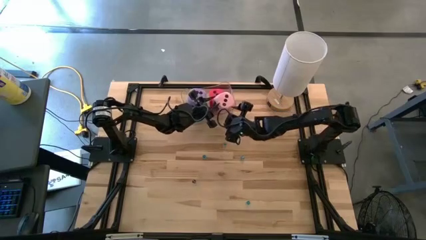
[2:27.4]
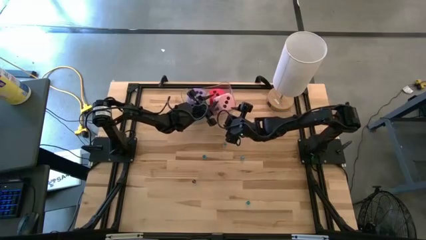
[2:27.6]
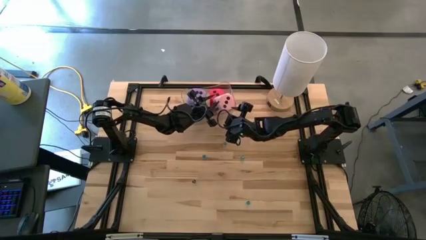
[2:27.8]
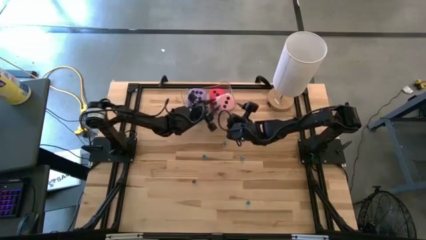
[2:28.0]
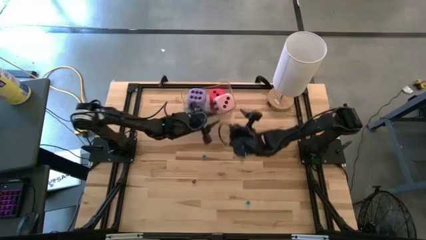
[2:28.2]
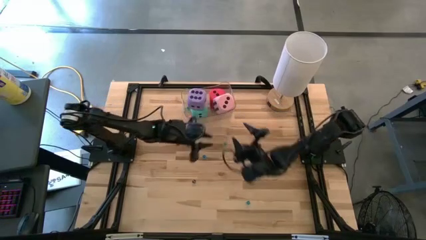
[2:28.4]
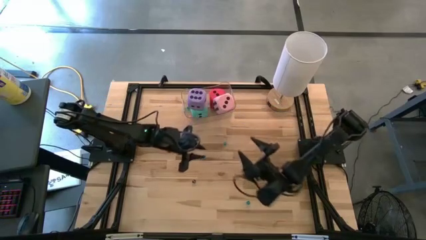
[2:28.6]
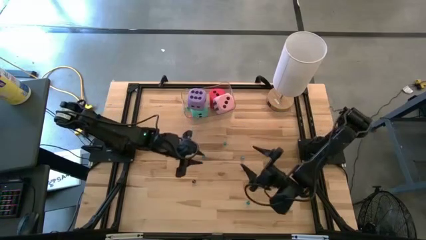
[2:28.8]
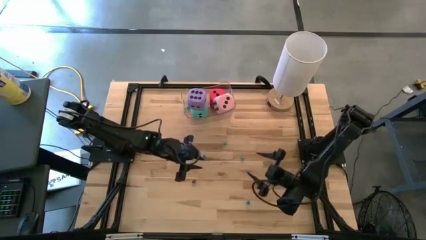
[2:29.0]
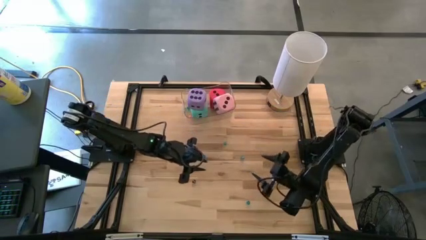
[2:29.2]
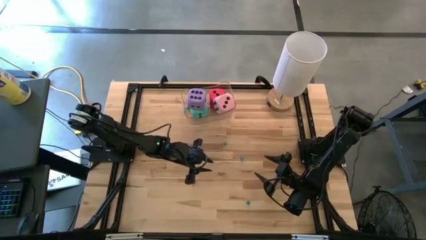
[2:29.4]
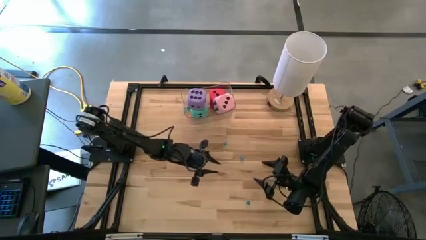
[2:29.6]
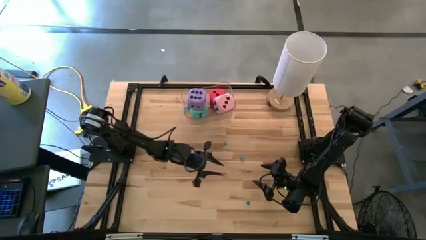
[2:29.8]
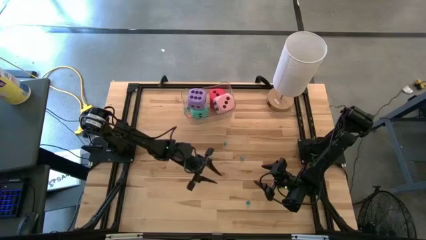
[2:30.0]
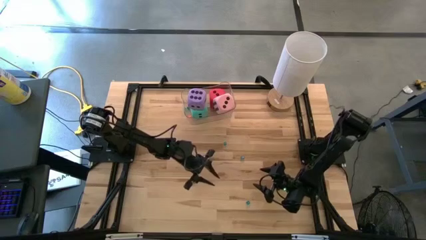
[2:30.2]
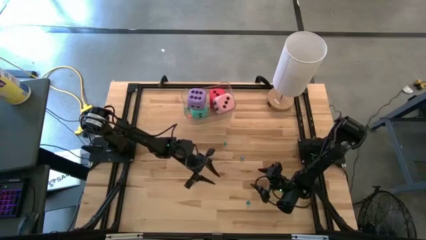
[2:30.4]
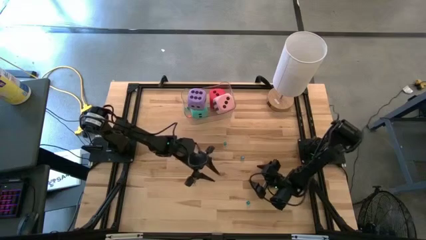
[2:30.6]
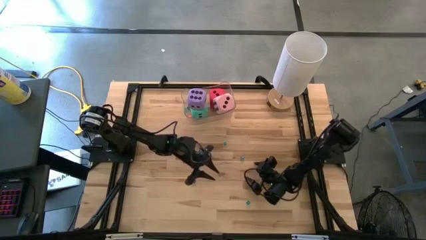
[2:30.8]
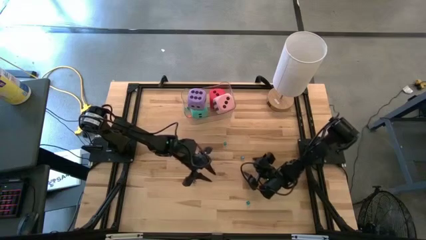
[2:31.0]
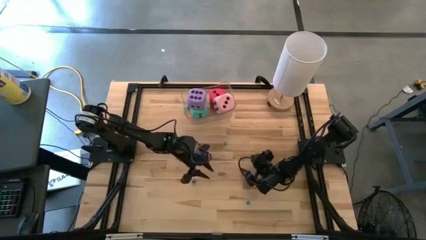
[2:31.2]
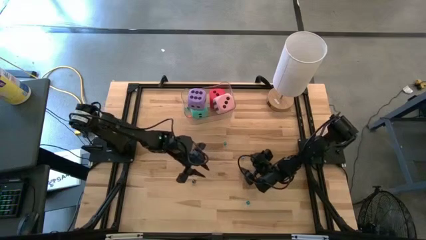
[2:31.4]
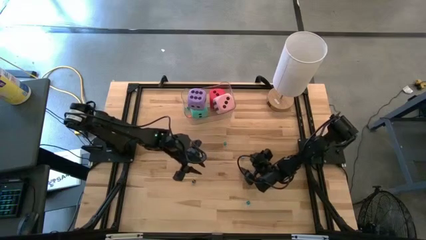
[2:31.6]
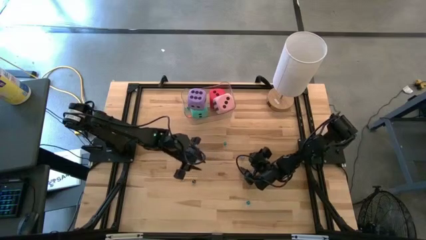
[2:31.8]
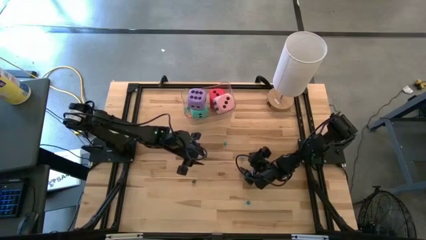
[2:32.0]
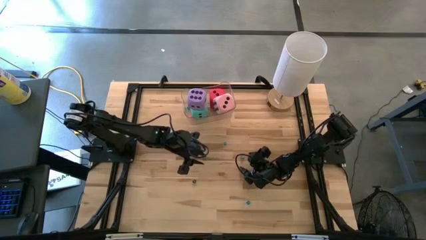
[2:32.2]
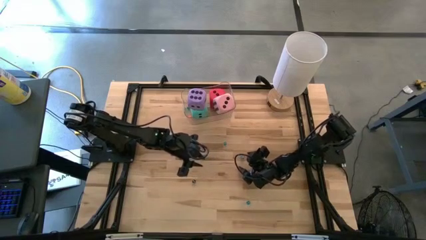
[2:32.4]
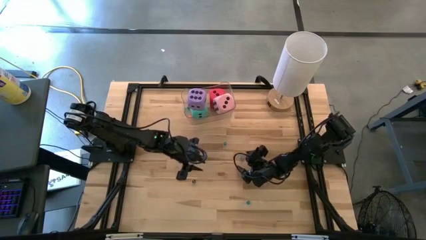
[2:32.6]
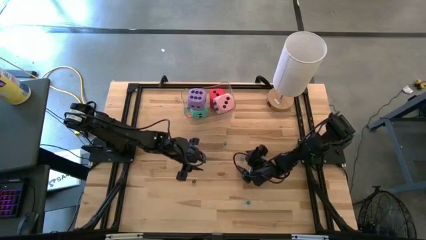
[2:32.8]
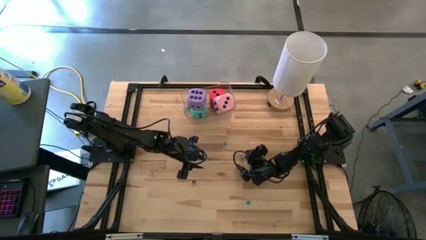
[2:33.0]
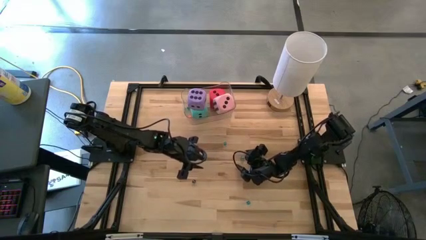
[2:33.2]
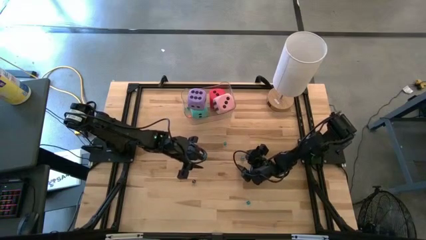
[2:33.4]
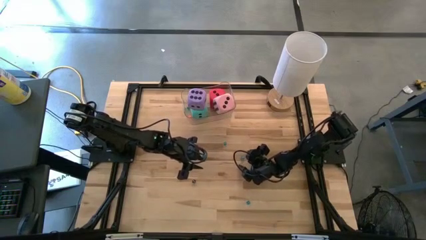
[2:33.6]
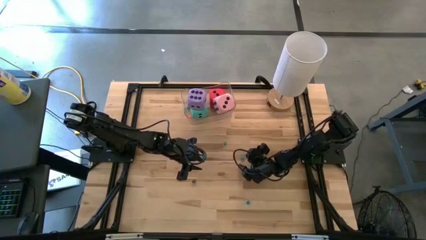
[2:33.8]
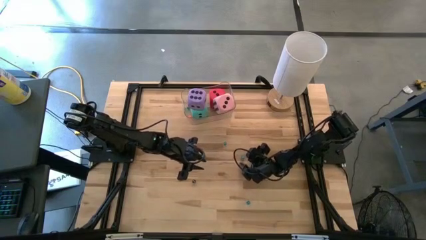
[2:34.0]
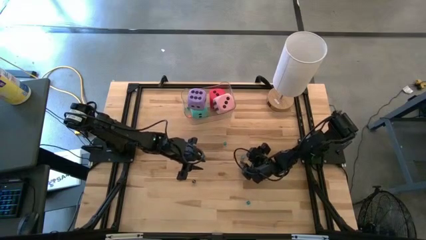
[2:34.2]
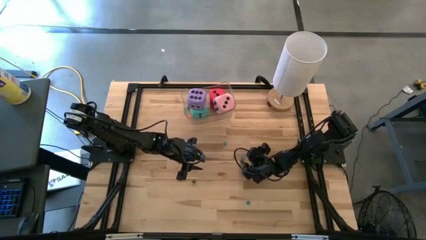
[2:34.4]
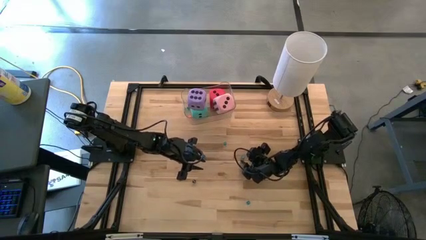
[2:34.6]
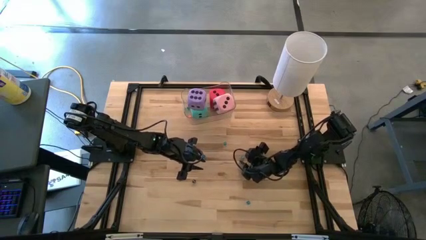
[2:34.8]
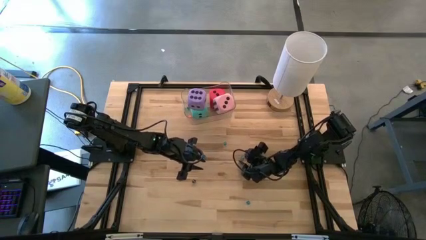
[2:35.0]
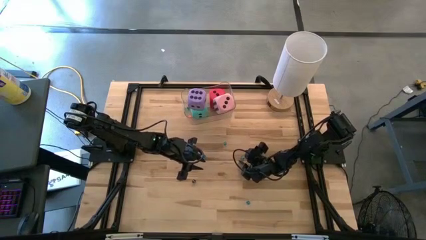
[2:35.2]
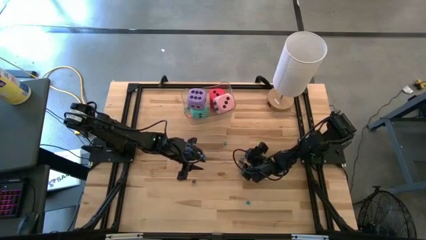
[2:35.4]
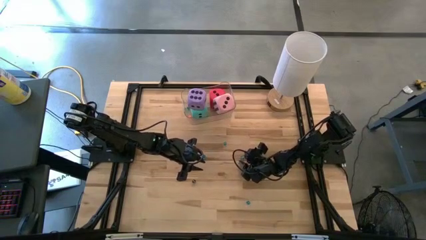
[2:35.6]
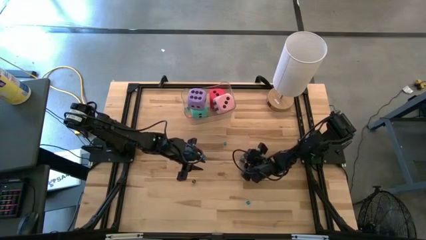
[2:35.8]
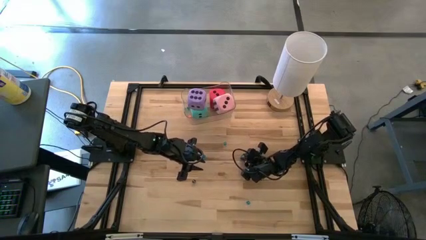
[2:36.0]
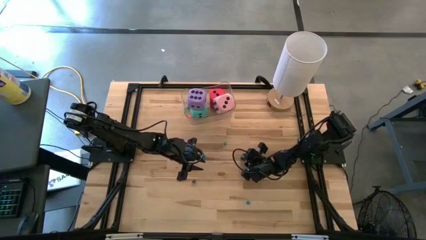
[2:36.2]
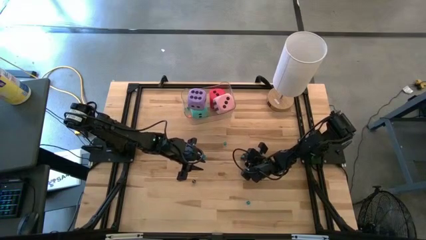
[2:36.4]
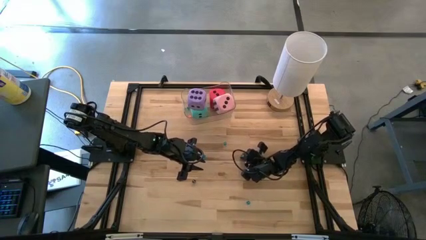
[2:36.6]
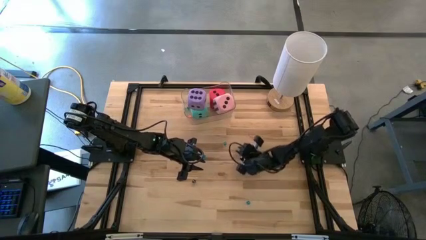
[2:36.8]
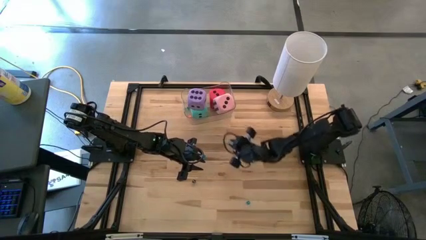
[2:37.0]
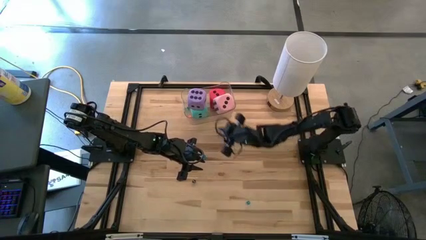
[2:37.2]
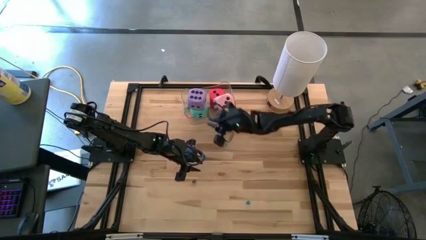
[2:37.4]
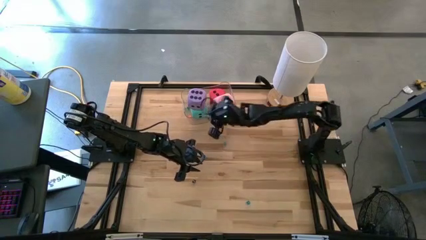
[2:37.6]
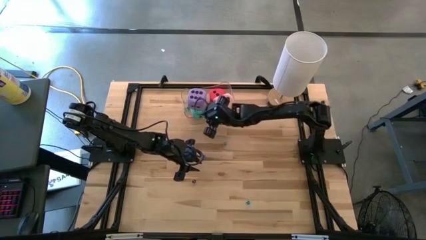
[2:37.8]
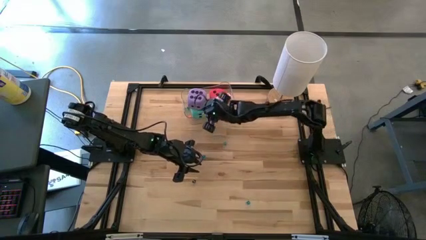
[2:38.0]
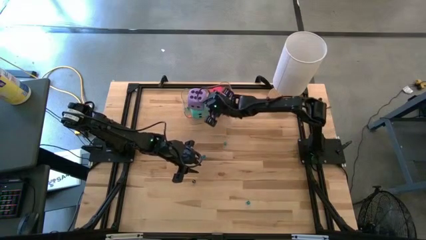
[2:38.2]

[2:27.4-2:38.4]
Task: Pick & Place Dice
Put the small light blue dice in the transparent bin

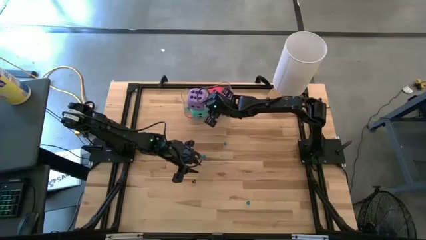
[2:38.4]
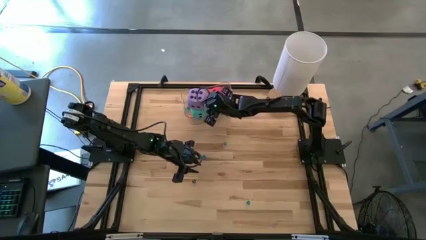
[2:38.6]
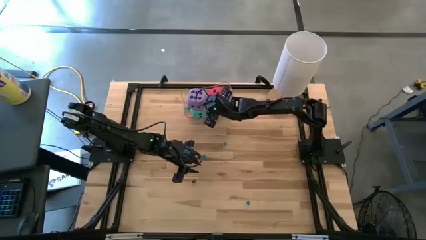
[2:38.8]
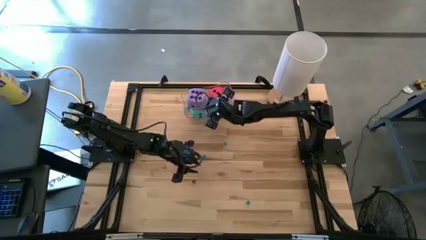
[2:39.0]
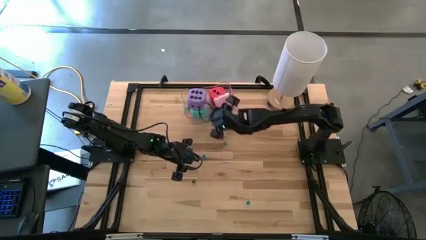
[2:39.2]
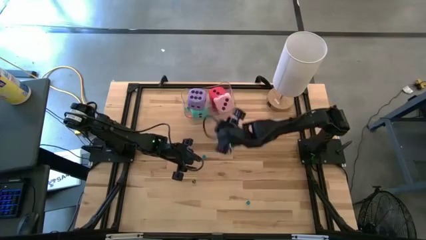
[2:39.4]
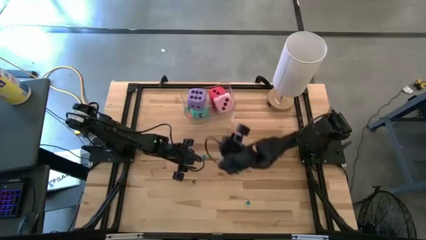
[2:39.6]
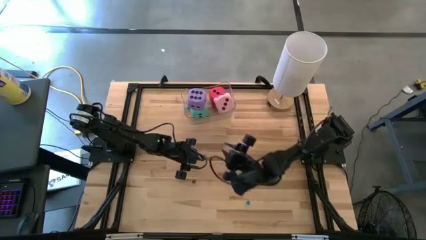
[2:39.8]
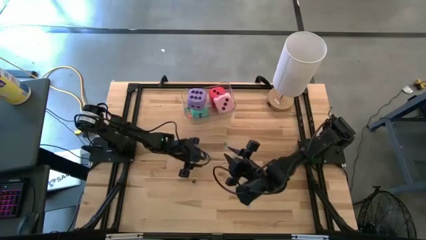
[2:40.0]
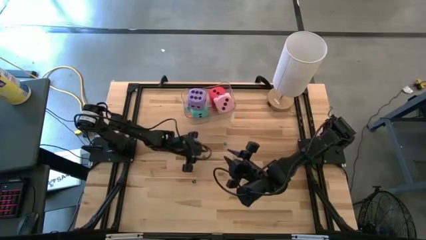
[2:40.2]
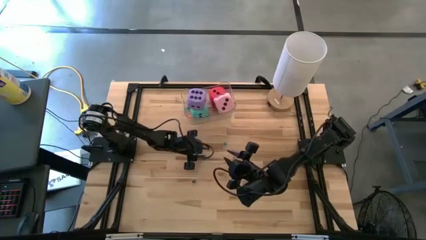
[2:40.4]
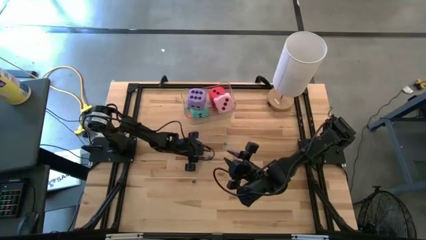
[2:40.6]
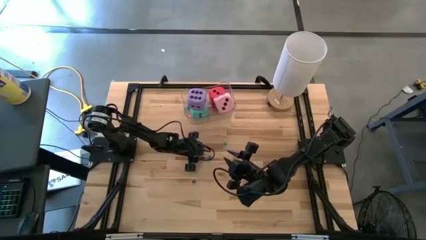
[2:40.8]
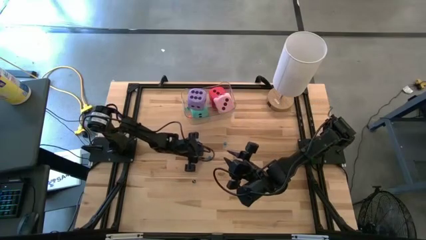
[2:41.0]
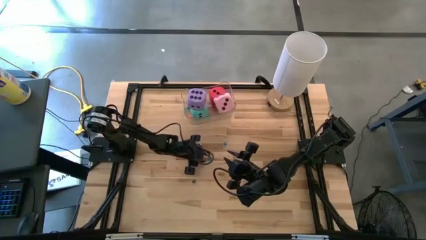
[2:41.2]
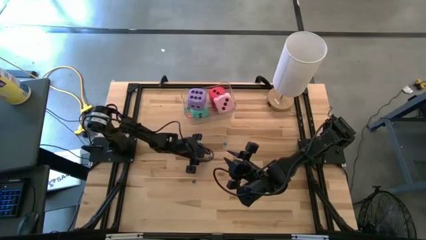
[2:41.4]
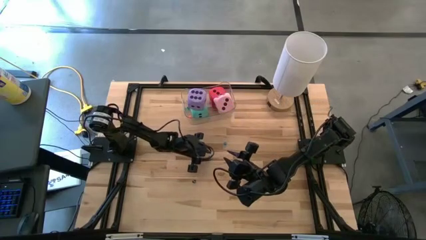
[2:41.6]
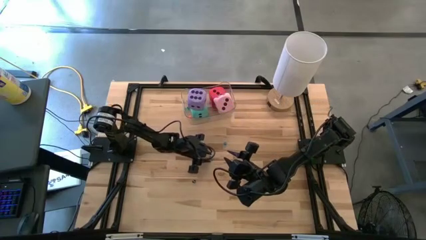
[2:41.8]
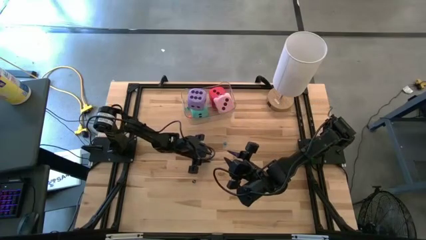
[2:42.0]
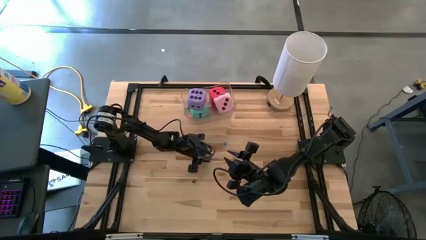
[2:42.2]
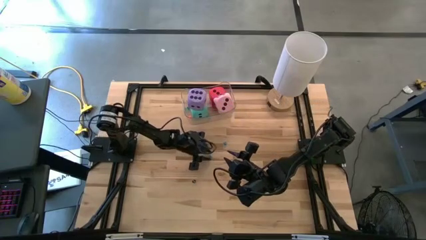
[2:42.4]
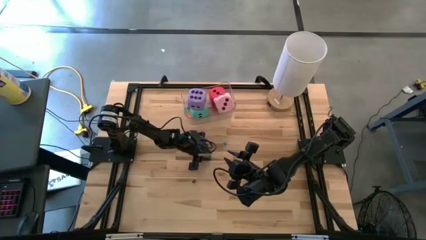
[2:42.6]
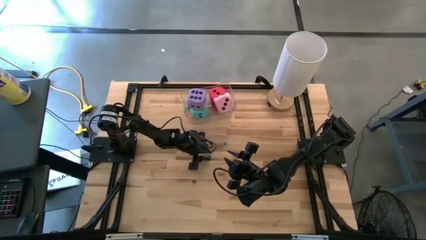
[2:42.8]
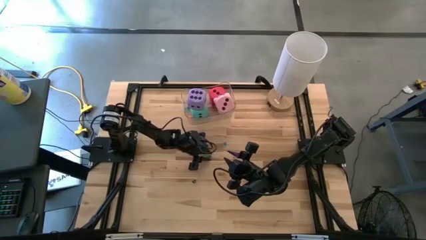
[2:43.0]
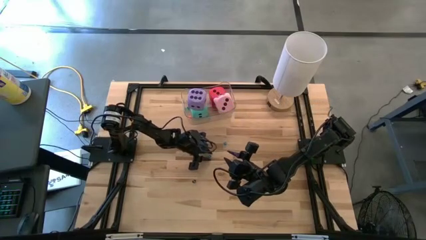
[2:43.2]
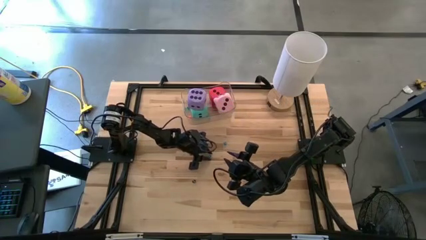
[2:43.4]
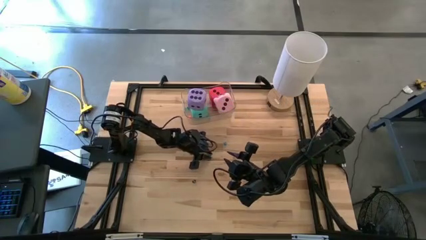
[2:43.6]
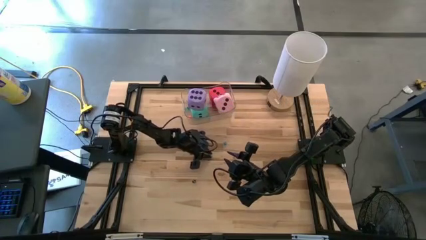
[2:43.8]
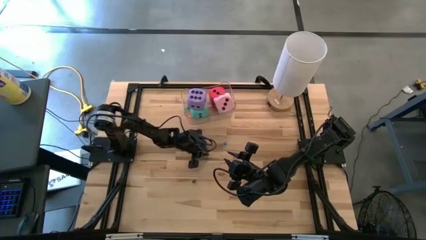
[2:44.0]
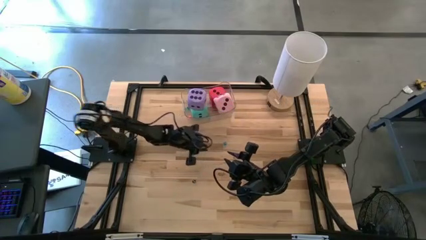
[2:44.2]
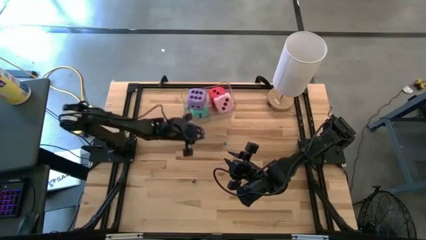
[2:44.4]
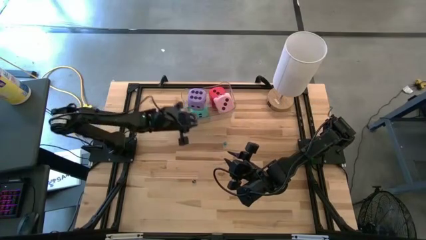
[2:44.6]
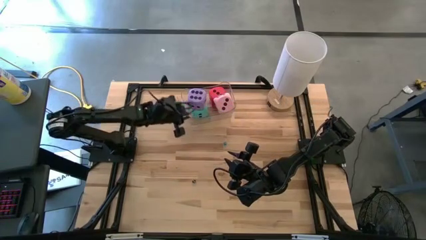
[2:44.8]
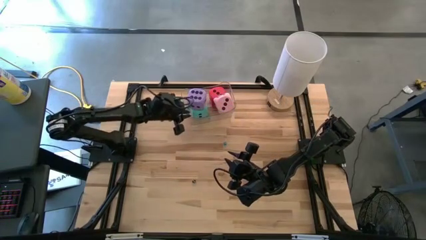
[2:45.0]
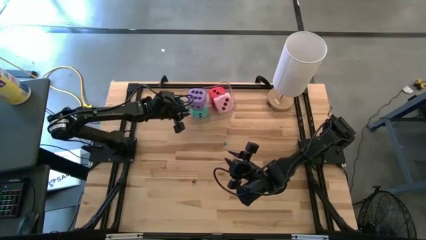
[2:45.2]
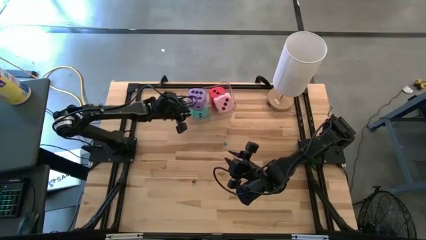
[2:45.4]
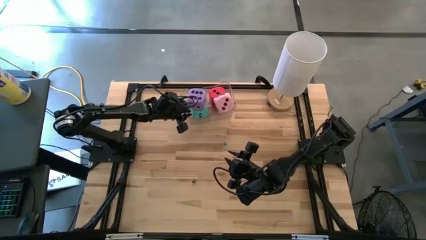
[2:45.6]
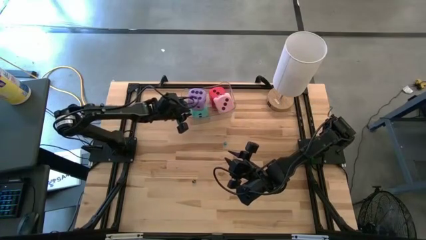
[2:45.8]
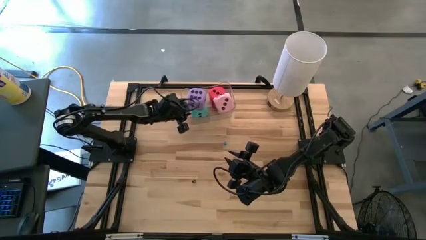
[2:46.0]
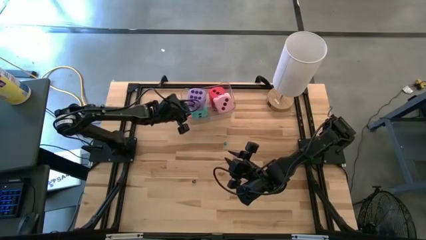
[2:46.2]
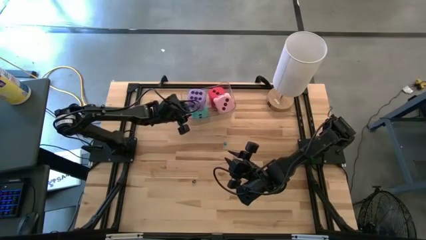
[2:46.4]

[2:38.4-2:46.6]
Put the small light blue dice in the transparent bin
